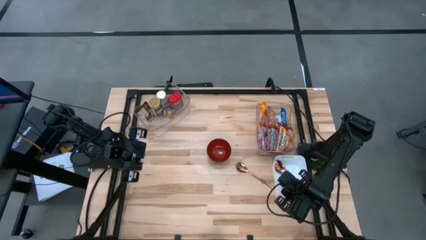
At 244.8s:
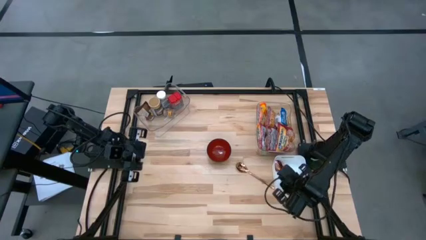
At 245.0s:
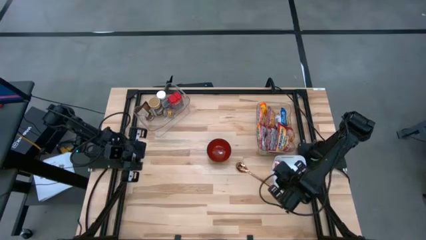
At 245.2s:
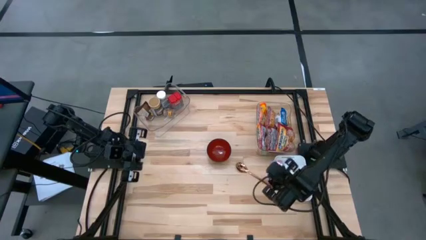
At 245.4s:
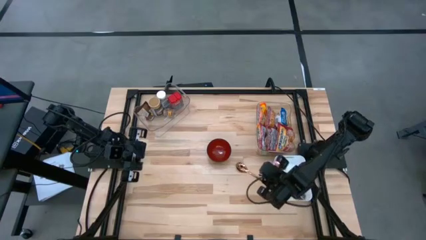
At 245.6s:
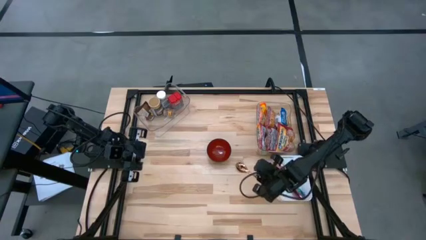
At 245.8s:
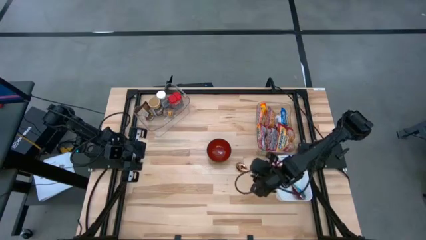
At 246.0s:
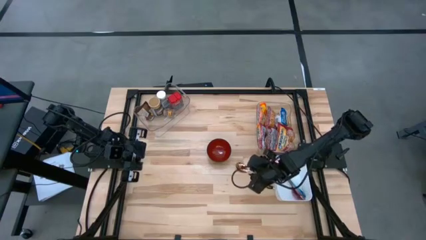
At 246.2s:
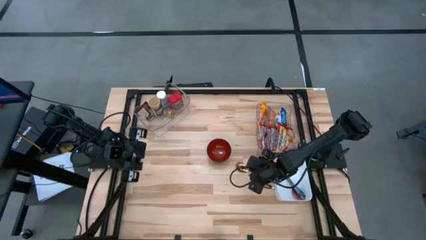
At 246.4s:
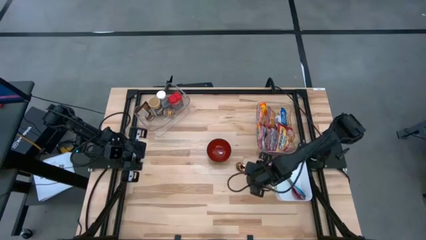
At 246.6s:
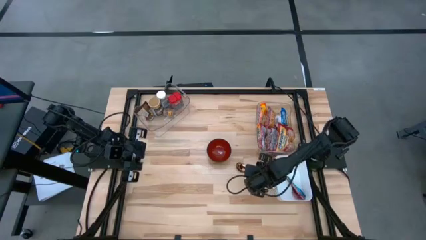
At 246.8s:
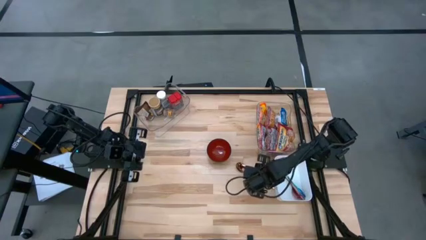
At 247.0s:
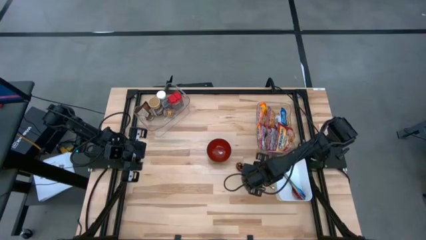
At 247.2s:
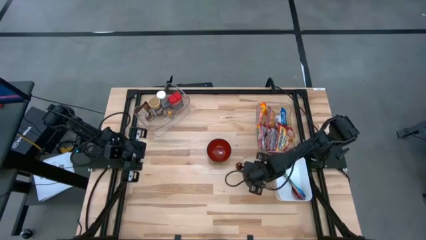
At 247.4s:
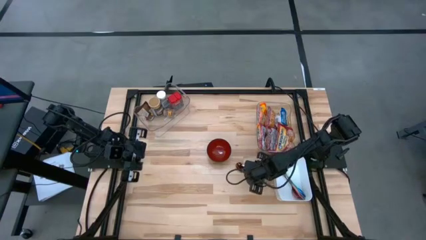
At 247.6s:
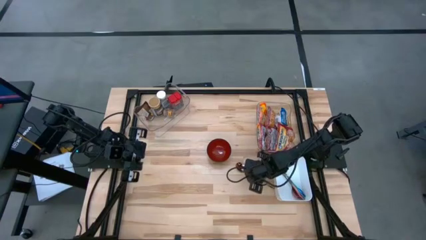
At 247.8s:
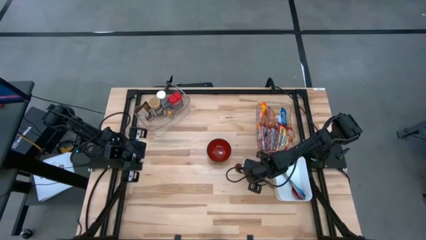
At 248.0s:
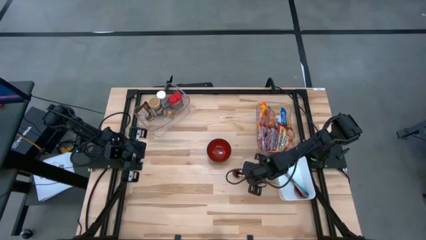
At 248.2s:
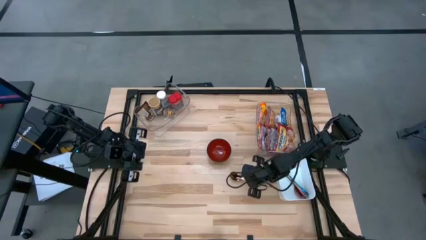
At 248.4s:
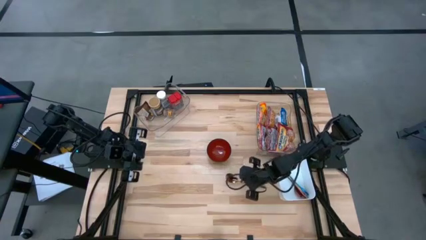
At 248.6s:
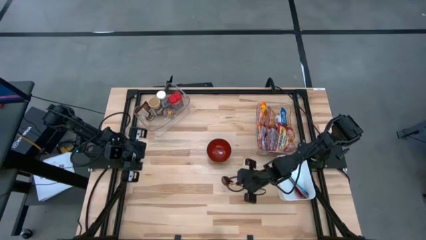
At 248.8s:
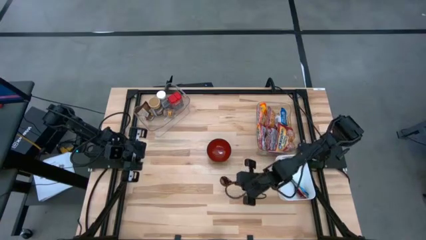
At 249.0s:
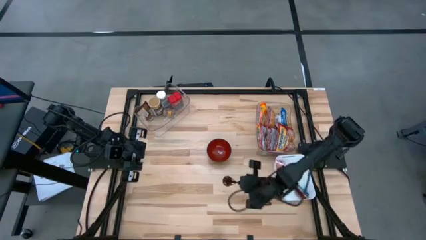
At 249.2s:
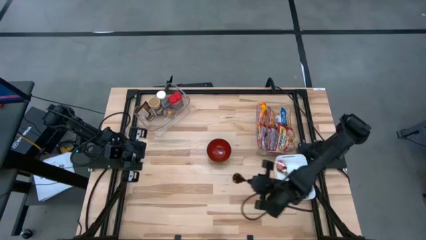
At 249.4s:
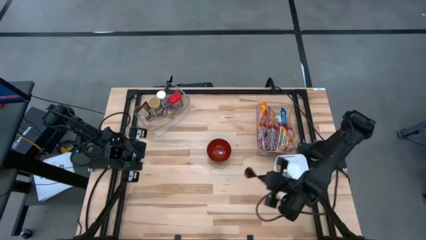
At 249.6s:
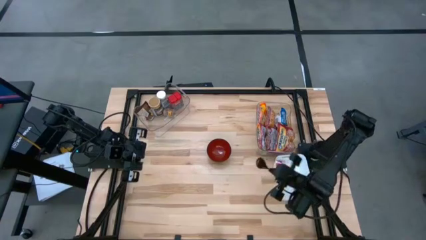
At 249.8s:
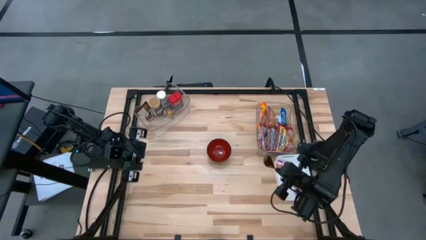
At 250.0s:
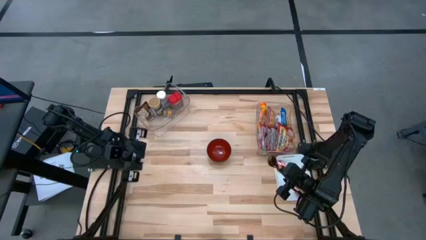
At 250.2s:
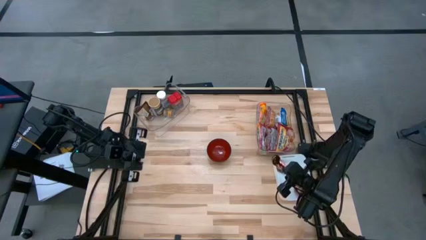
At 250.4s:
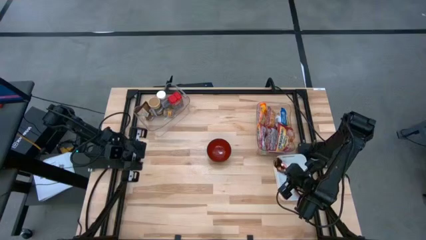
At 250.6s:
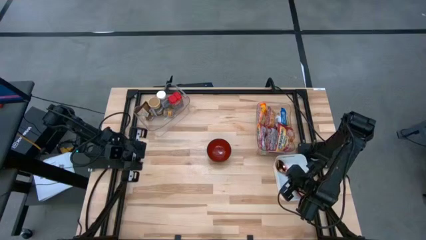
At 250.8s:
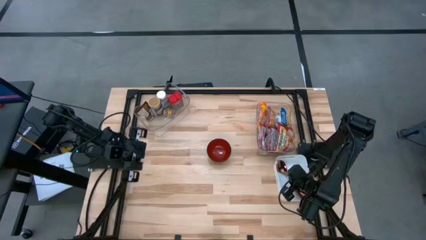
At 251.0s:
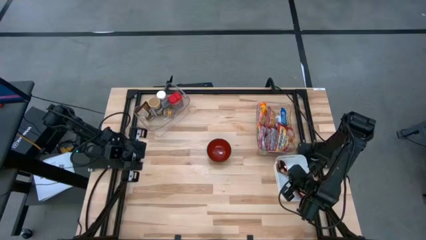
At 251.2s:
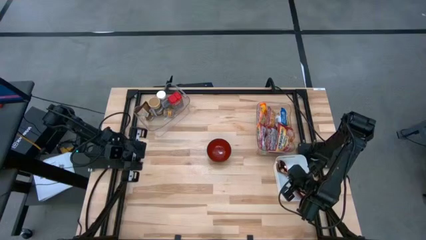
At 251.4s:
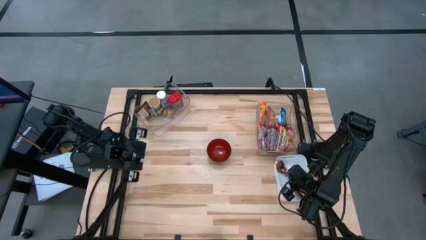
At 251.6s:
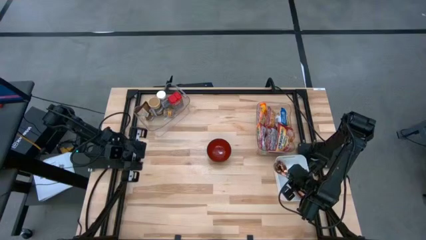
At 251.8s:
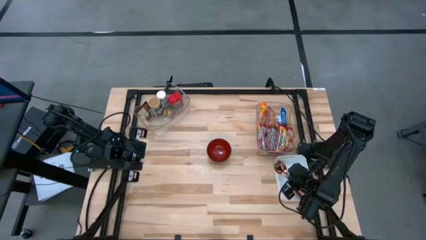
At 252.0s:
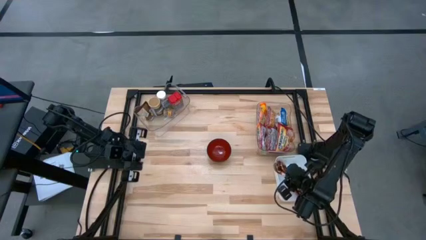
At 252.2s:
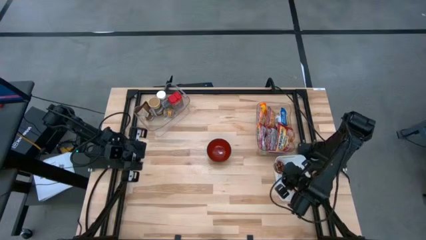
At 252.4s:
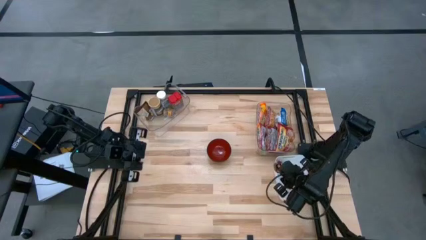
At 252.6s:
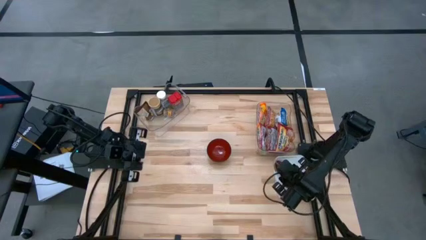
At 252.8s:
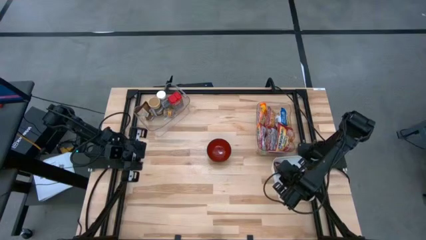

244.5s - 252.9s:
Task: Pick & Place Food Item
Put the brown spoon into the white bin

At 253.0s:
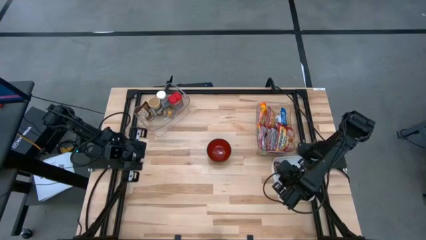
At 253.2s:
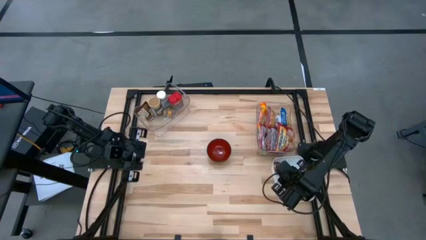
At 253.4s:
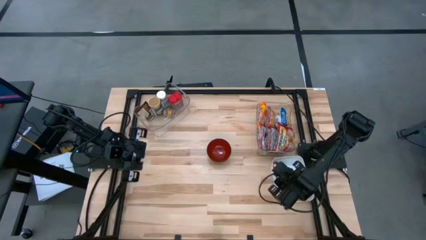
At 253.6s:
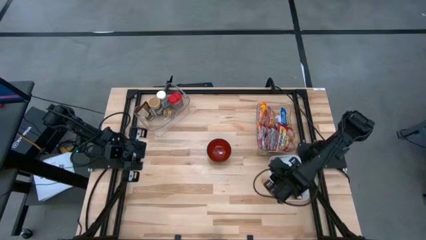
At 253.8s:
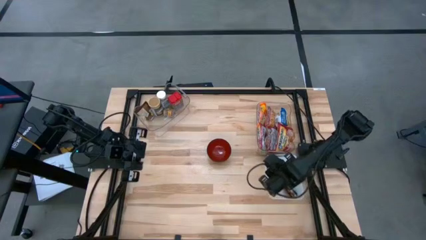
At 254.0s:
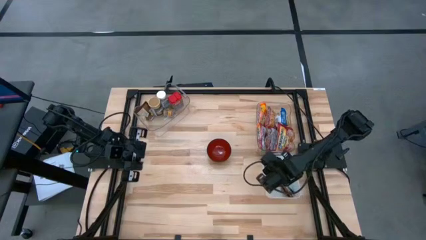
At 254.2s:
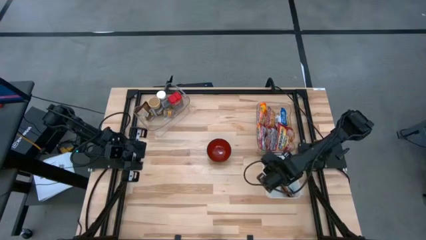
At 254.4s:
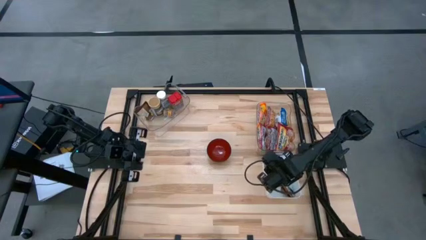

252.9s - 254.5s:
Adjust the white bin on the table

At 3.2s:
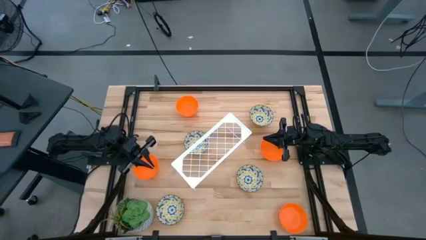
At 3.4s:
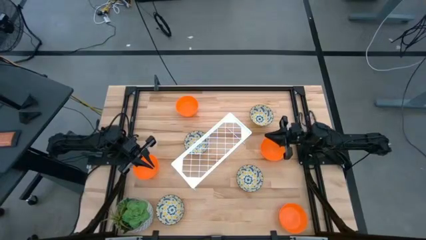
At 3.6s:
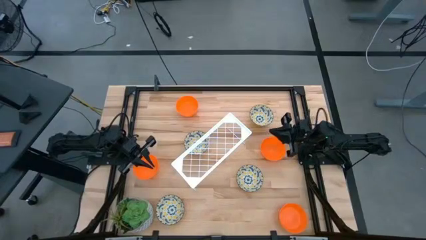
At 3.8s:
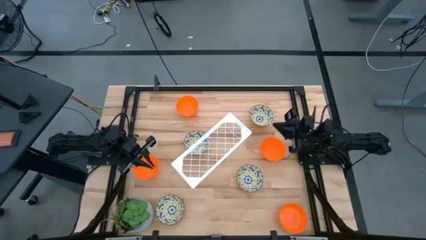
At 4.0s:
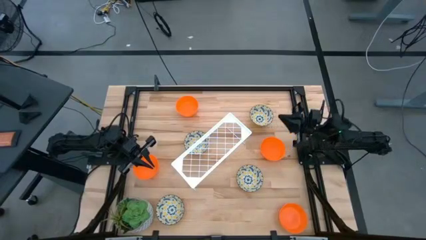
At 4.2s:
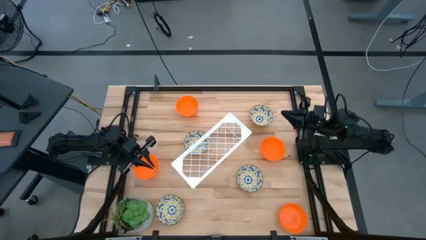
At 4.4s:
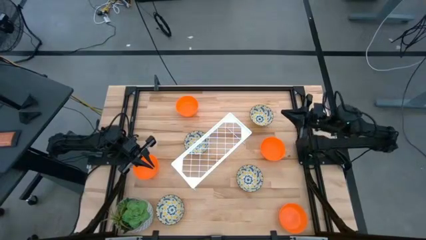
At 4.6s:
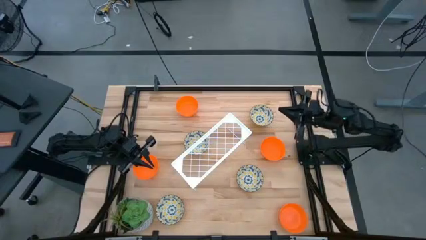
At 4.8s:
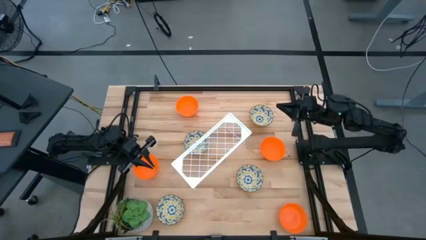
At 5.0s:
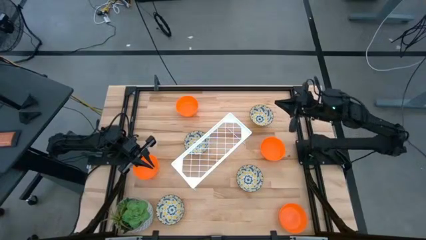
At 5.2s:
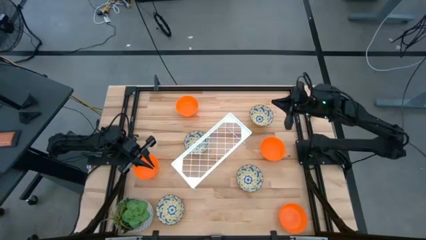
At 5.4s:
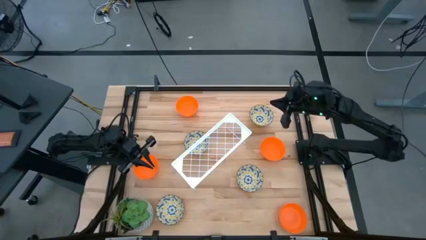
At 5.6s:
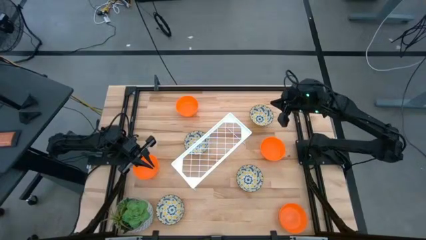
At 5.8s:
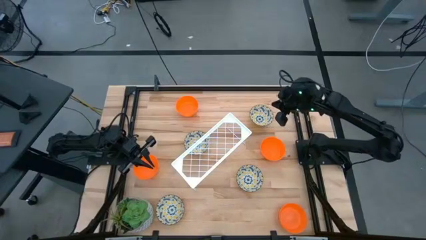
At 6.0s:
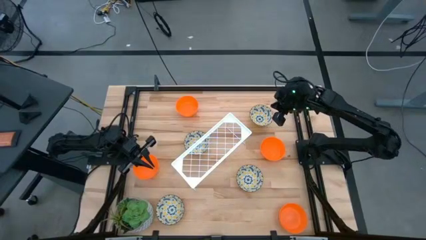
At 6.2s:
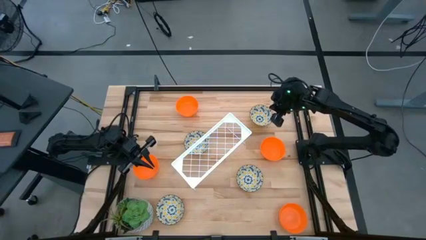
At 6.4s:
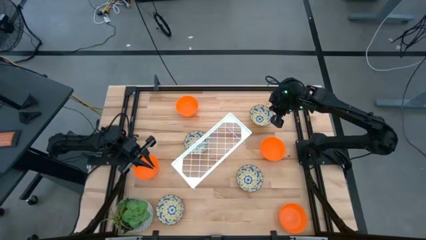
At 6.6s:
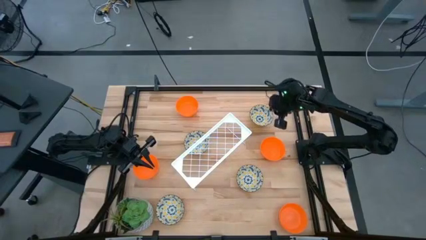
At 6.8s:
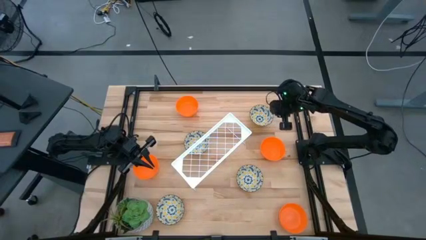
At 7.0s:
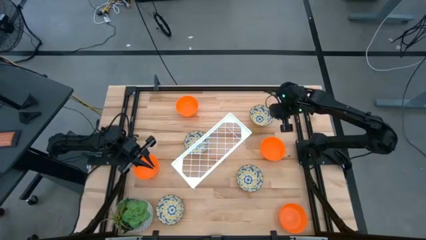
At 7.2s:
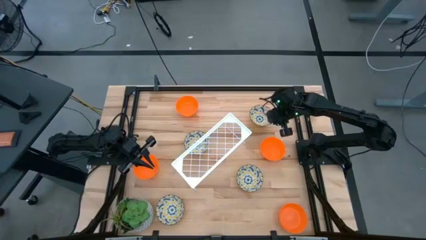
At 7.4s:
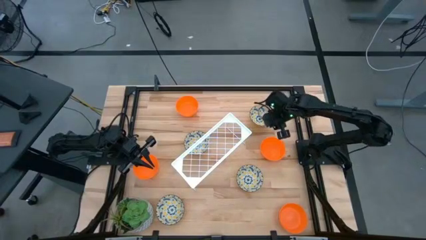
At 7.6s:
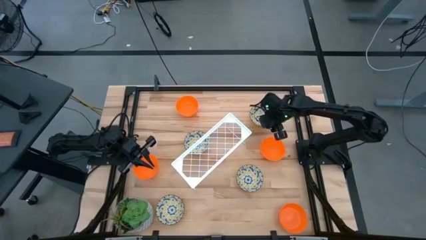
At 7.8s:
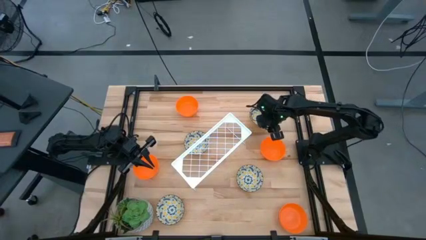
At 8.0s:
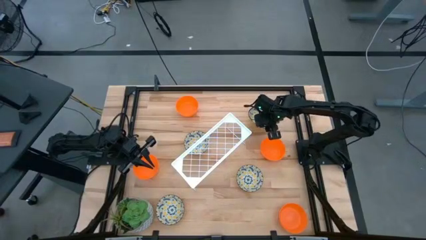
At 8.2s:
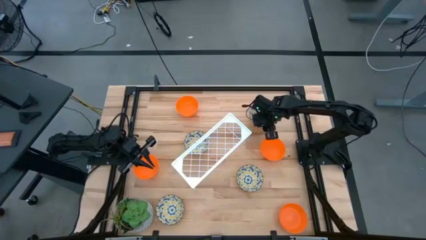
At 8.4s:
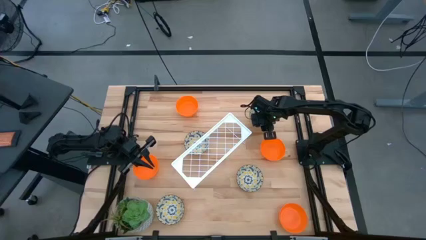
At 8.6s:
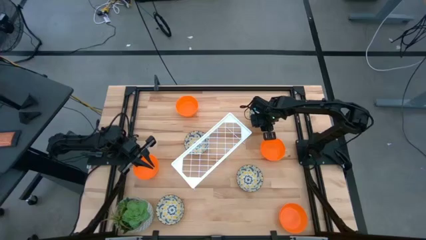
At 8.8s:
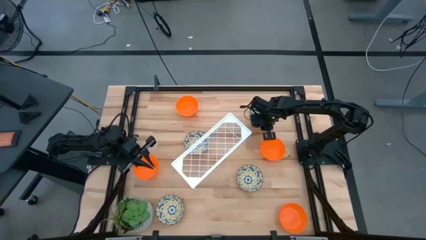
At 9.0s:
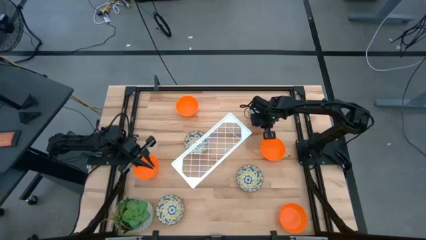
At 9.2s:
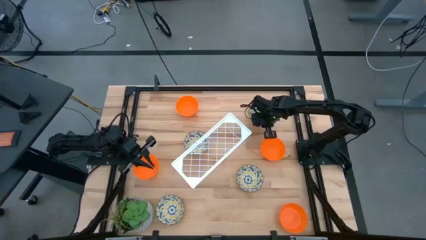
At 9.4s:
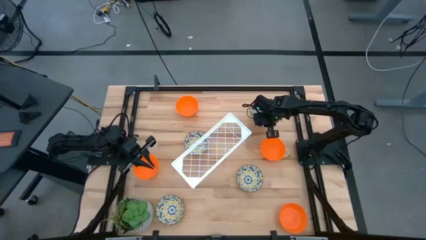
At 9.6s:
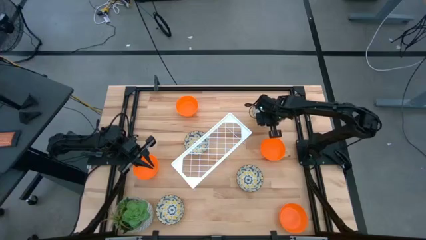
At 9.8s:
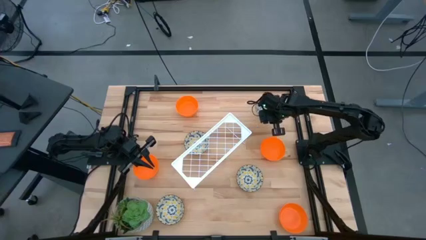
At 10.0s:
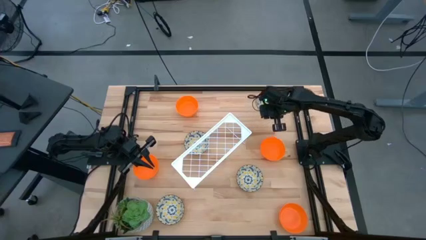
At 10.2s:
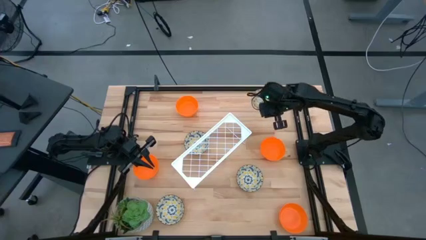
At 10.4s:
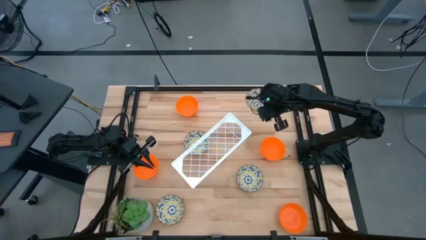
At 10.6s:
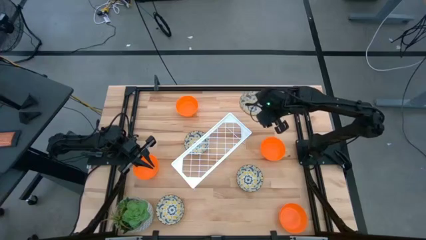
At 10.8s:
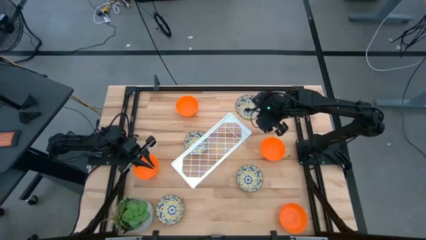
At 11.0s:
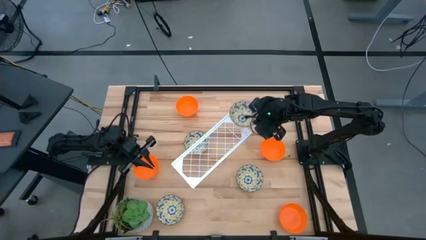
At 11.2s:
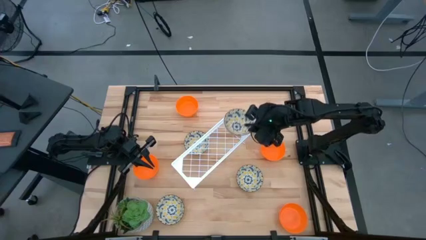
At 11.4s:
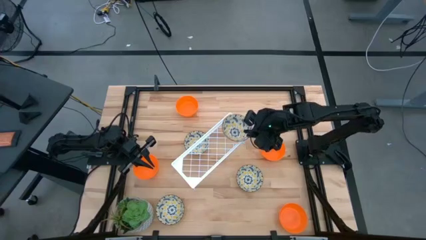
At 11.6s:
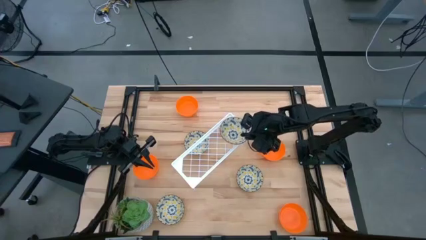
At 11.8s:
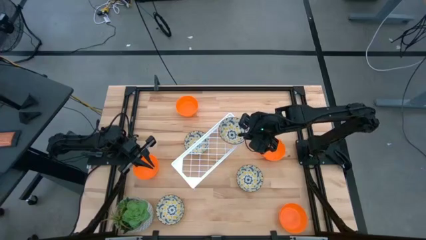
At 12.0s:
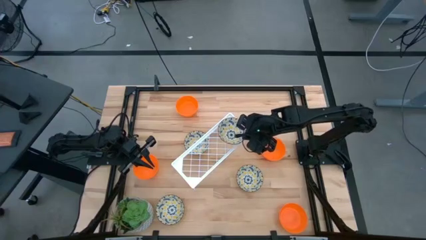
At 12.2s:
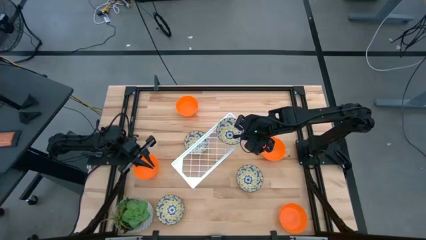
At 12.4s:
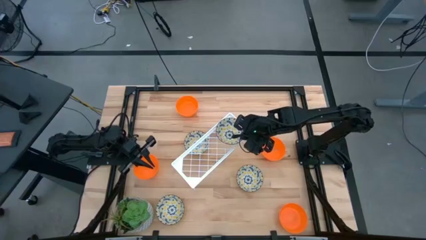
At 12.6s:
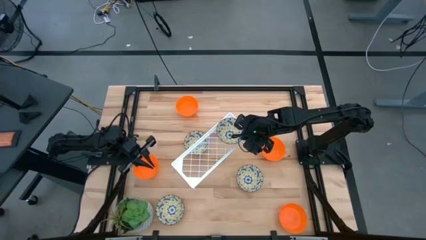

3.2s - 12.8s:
Task: Pick & Place Mini bowls
Put the yellow patterned bowl on the shelf
